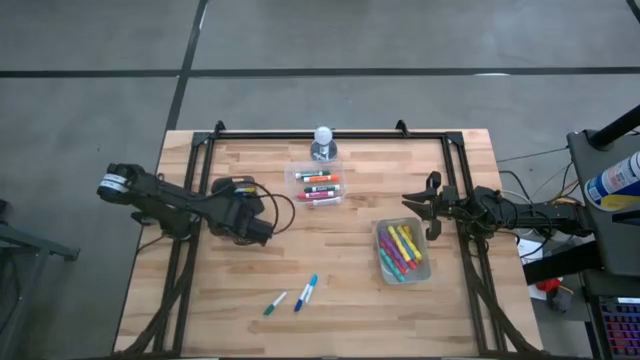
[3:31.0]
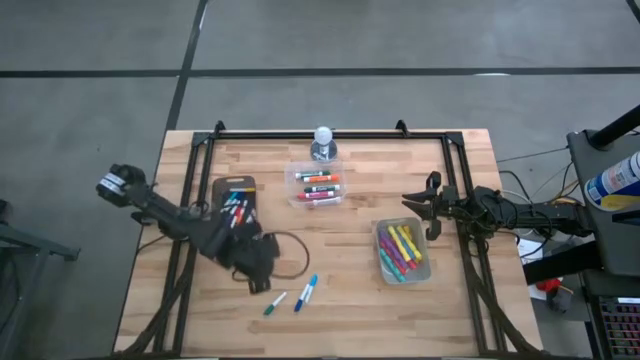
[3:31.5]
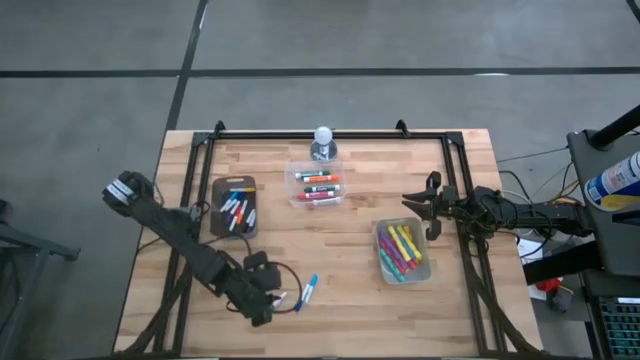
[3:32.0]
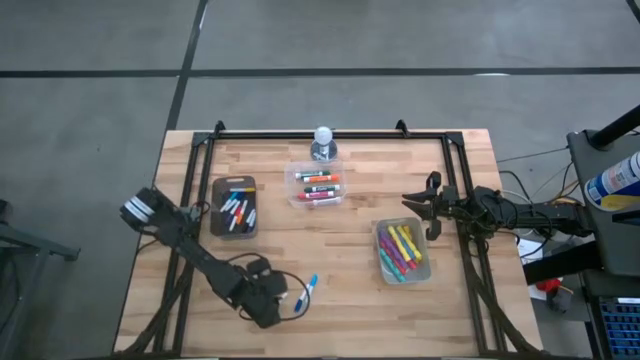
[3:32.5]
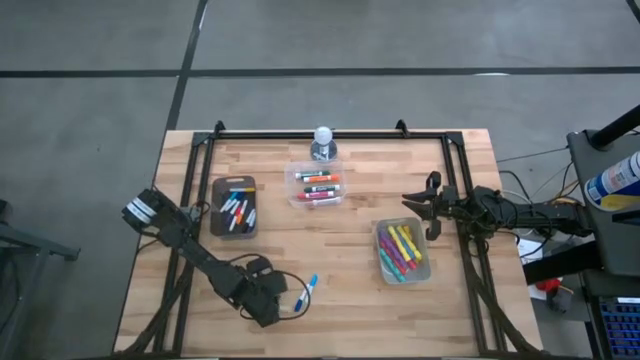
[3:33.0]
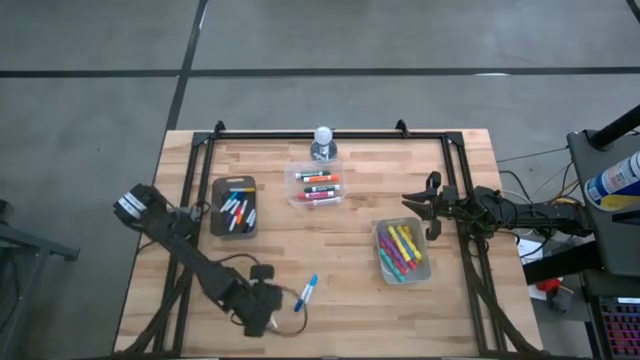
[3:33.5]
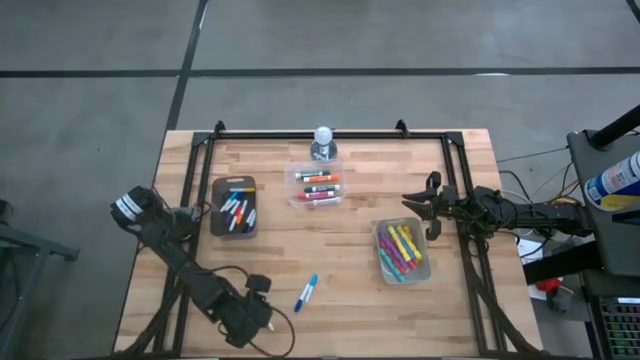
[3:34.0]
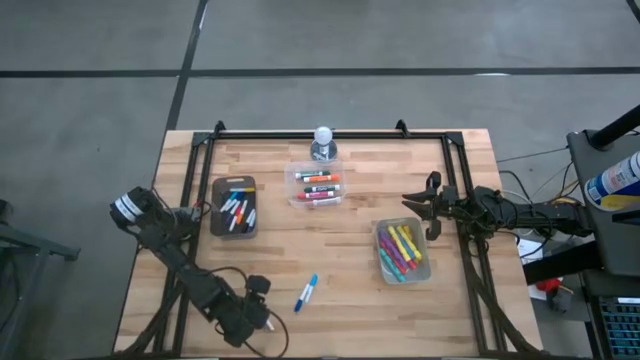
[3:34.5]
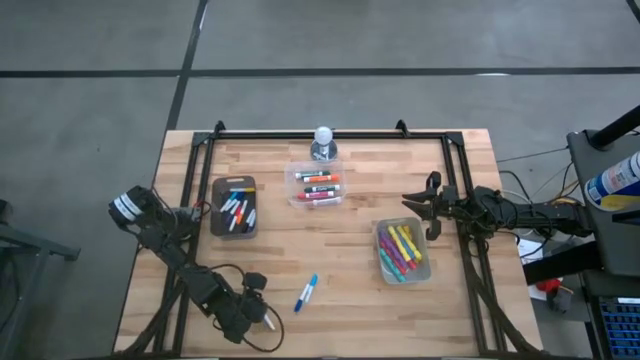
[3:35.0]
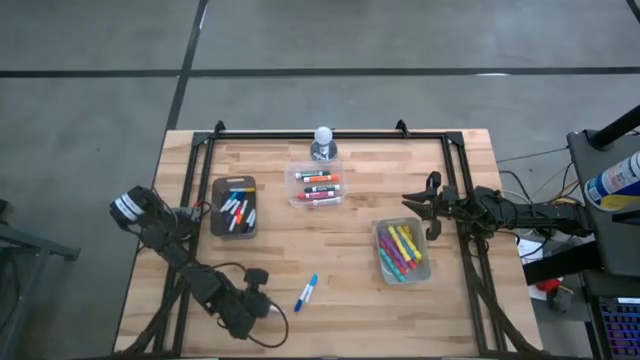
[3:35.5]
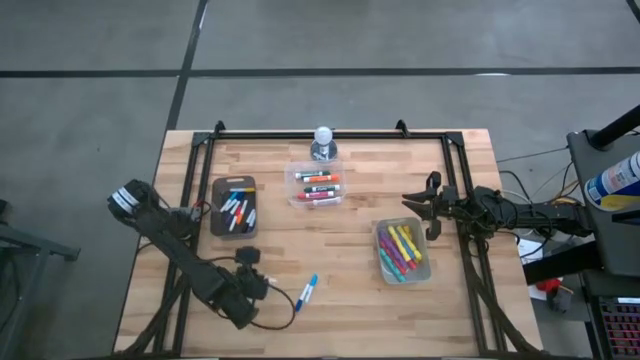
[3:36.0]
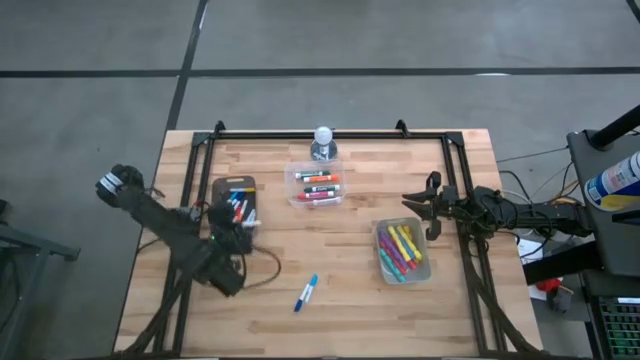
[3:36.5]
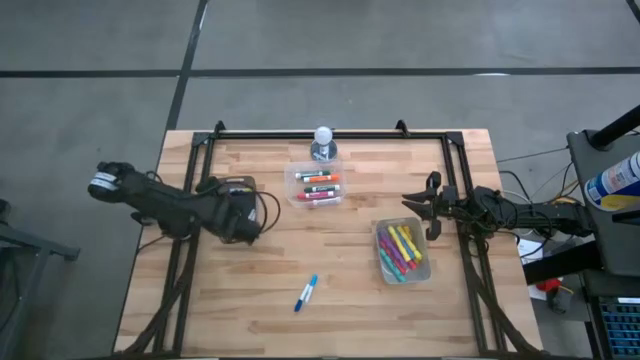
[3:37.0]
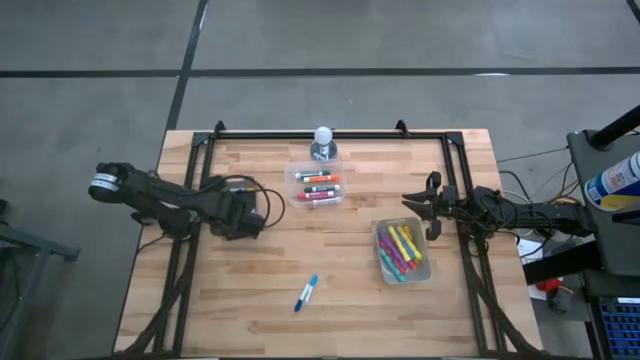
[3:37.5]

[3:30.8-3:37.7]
Task: Pick & Place Markers
Put the green mini marker into the transparent black bin

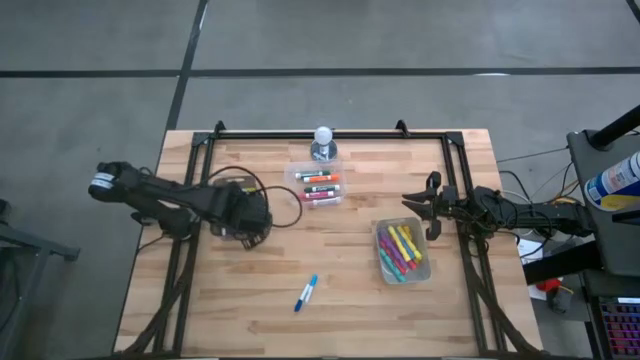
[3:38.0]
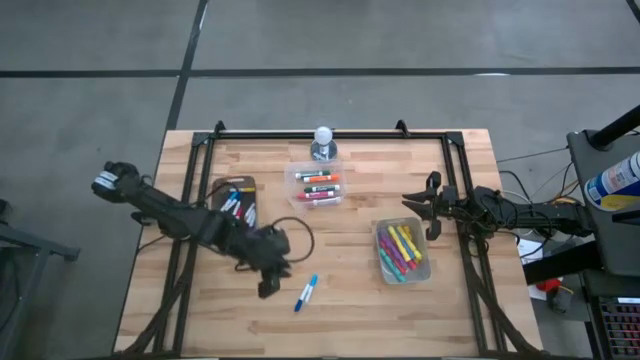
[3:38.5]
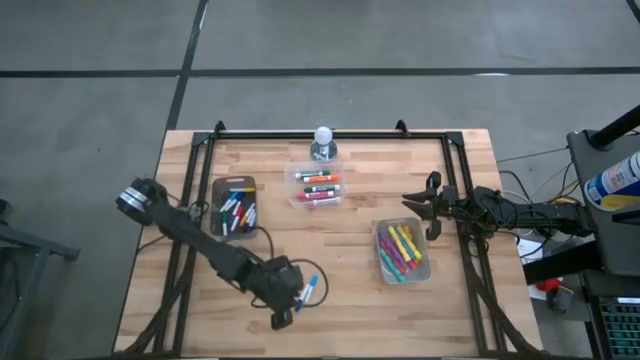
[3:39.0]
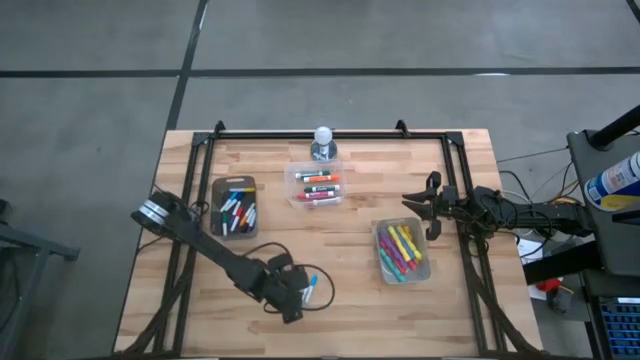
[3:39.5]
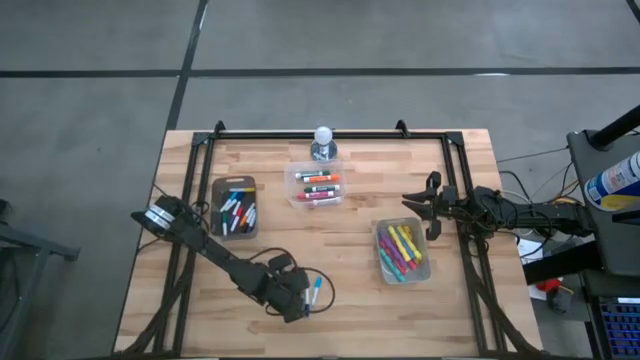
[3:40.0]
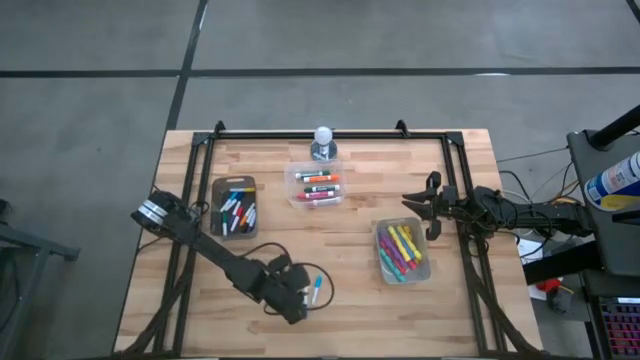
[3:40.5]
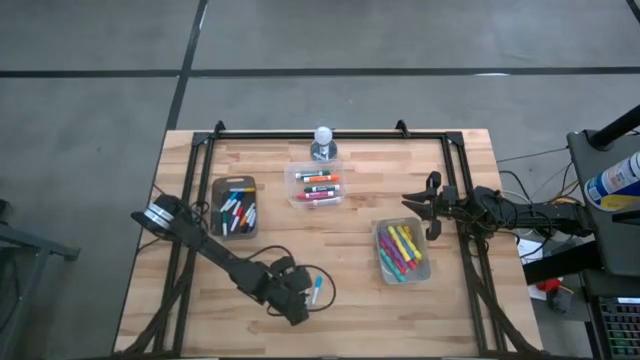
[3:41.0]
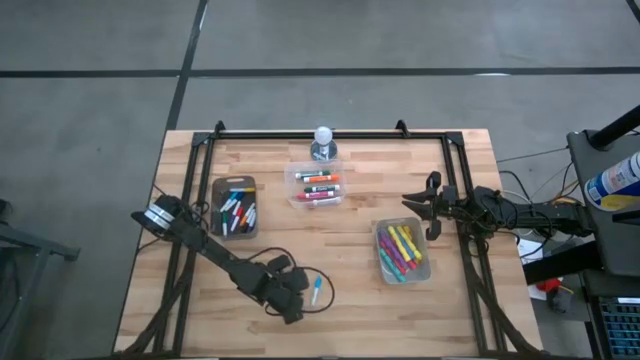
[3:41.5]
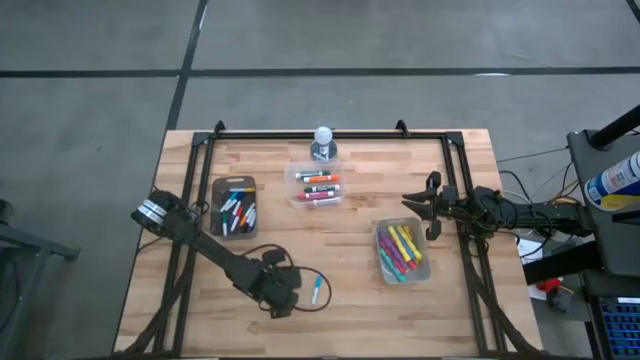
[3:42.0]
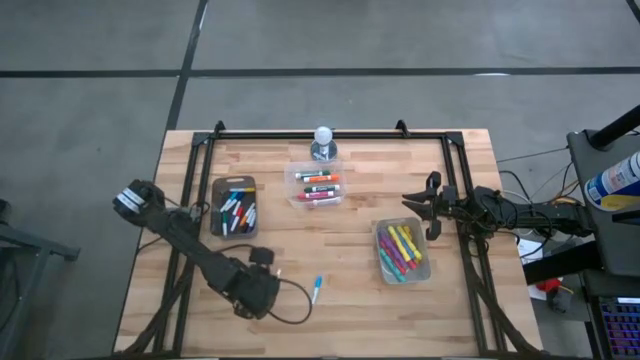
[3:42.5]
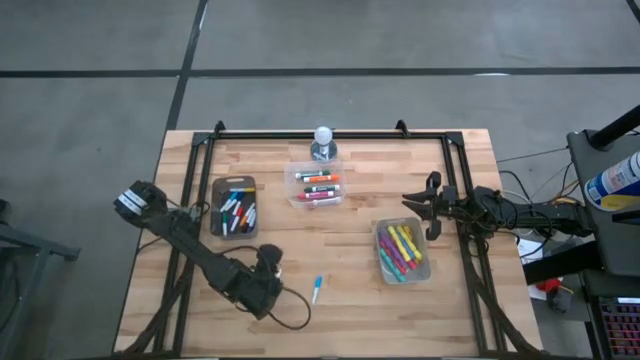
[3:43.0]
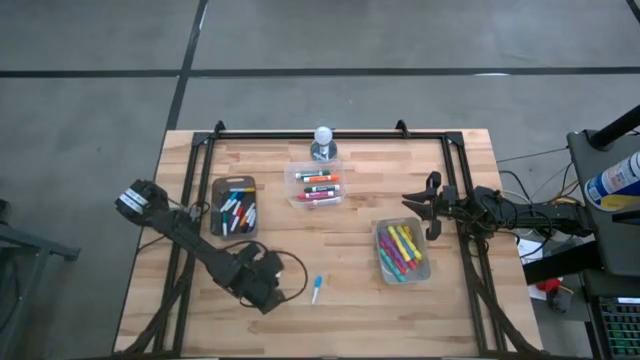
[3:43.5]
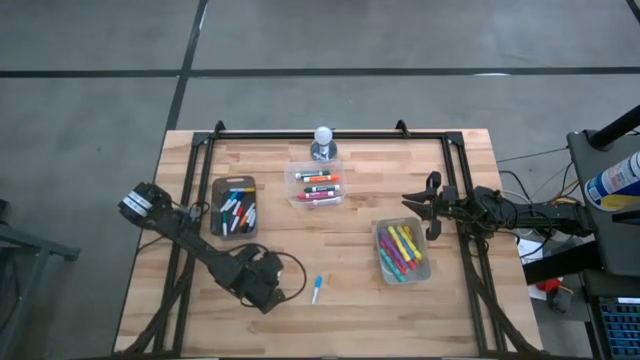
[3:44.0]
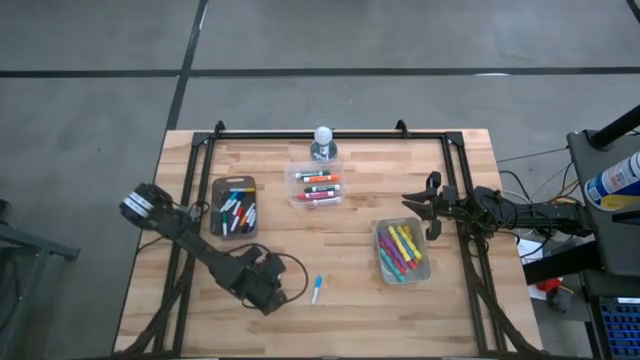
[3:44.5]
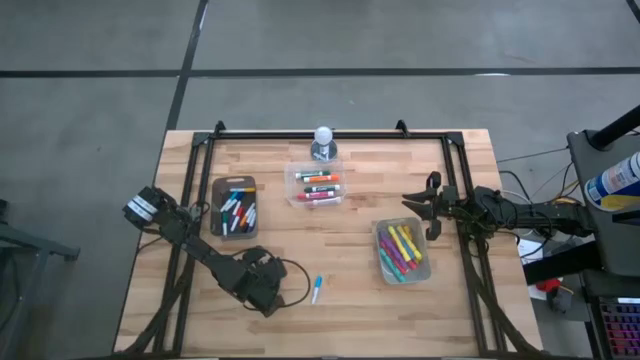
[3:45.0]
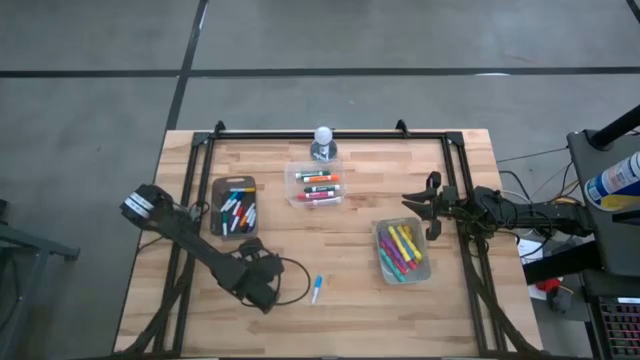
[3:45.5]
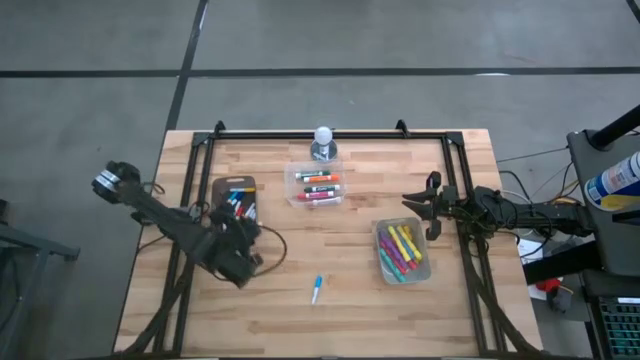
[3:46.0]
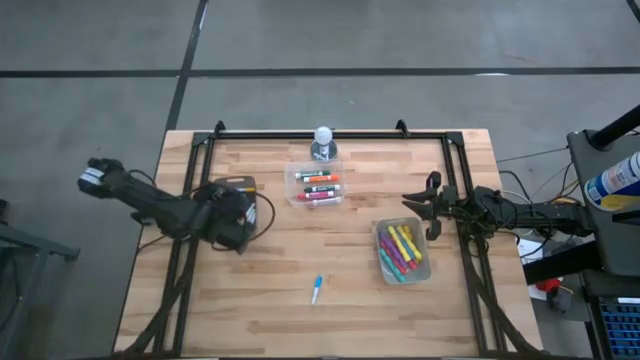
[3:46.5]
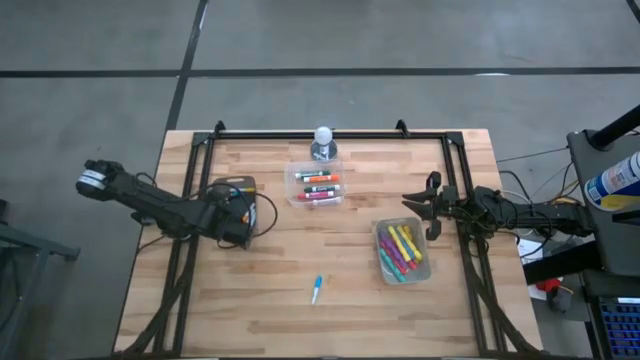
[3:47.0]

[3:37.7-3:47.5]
Put the dark blue mini marker into the transparent black bin

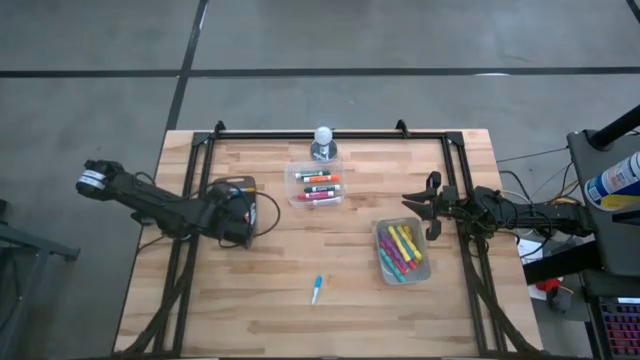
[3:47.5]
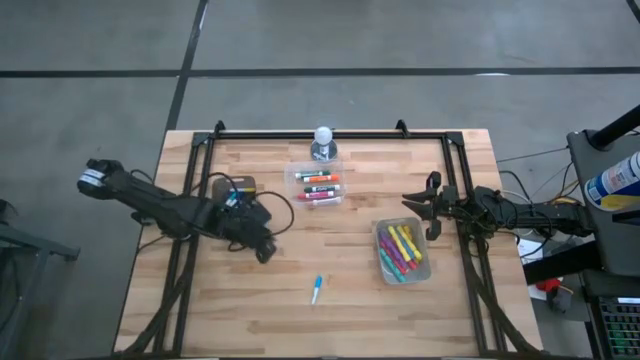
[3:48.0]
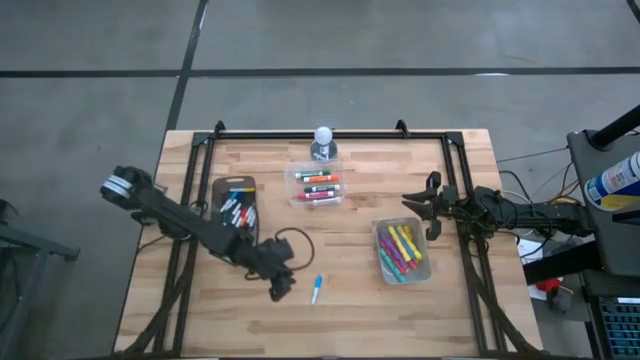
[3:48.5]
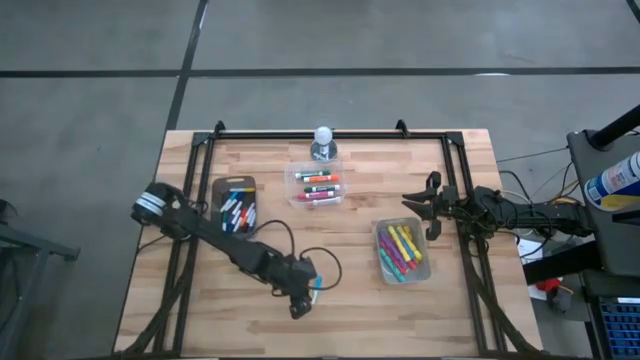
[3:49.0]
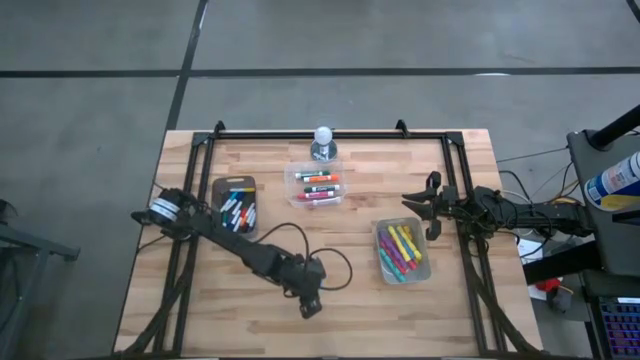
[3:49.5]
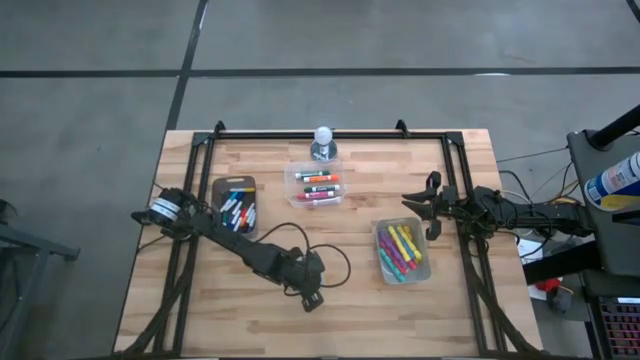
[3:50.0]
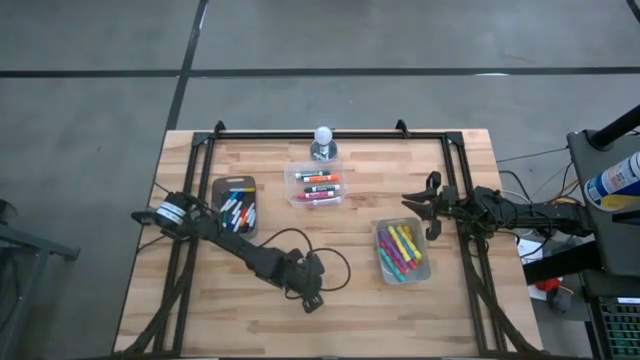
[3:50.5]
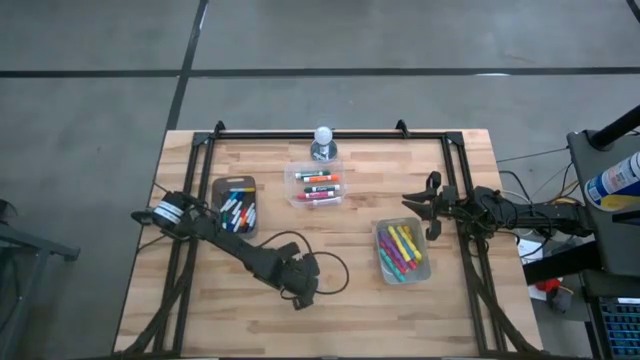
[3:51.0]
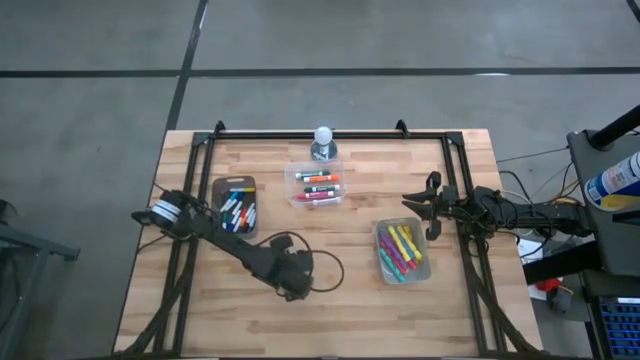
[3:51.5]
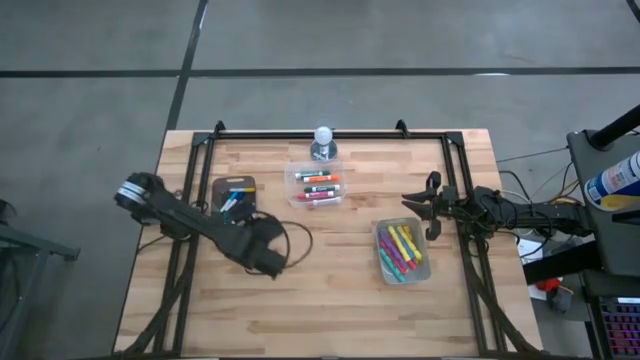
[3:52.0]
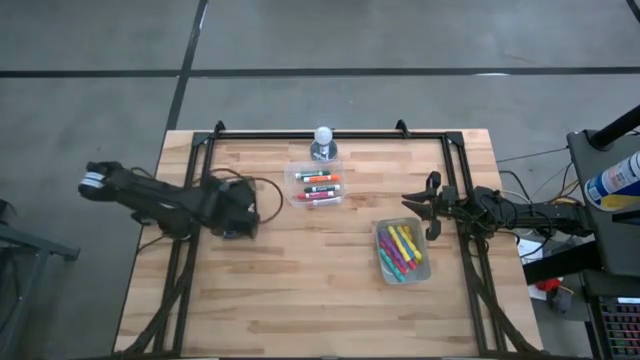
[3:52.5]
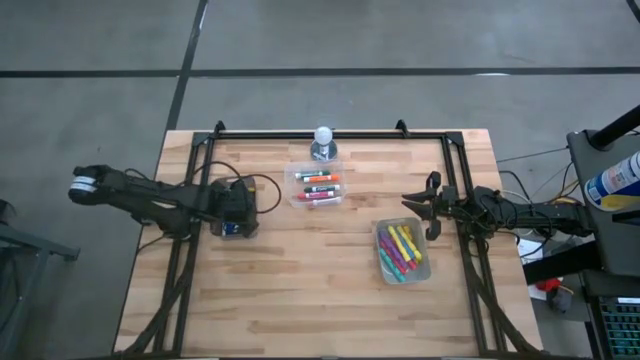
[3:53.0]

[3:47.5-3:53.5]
Put the light blue mini marker into the transparent black bin
